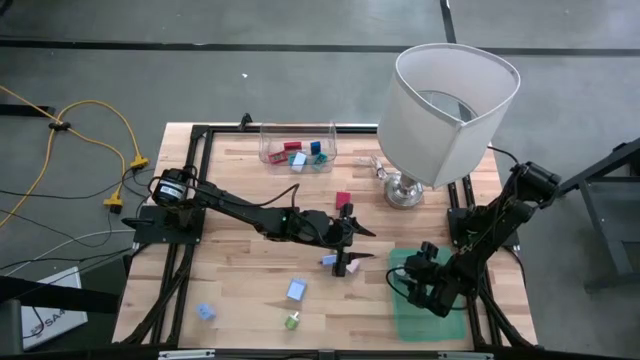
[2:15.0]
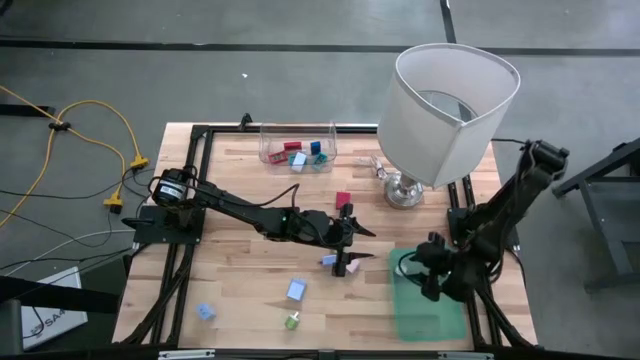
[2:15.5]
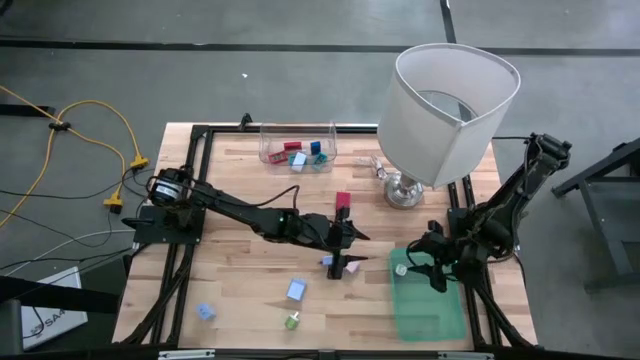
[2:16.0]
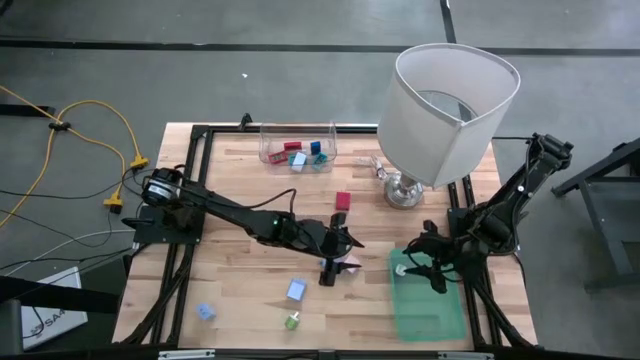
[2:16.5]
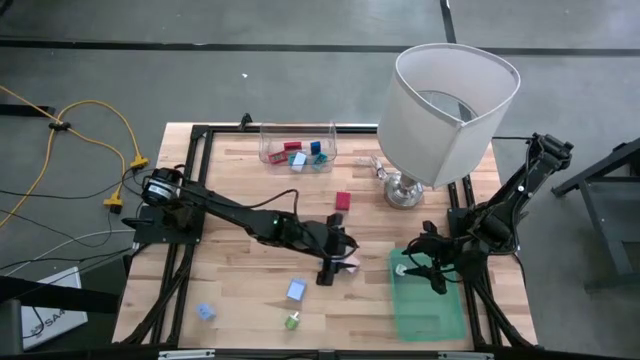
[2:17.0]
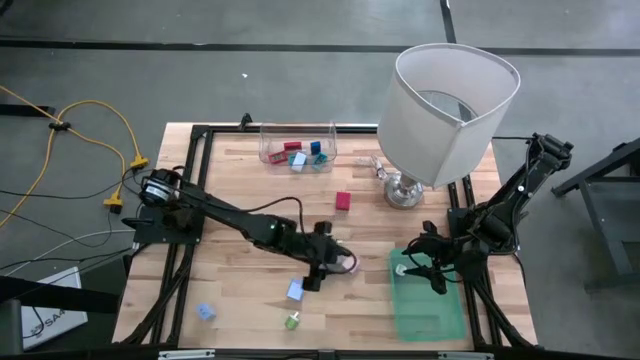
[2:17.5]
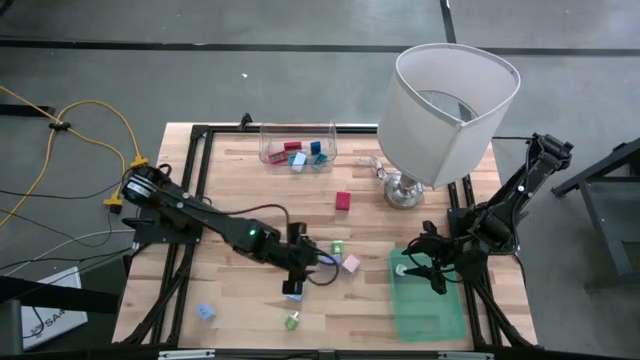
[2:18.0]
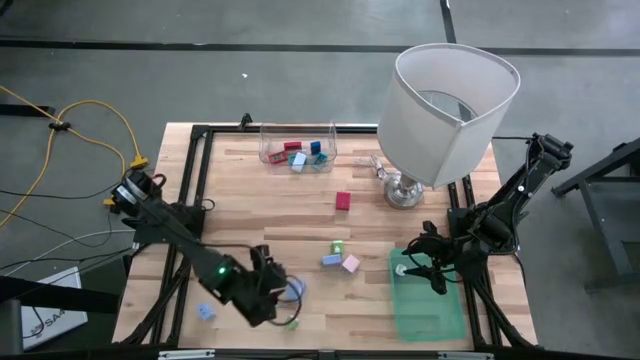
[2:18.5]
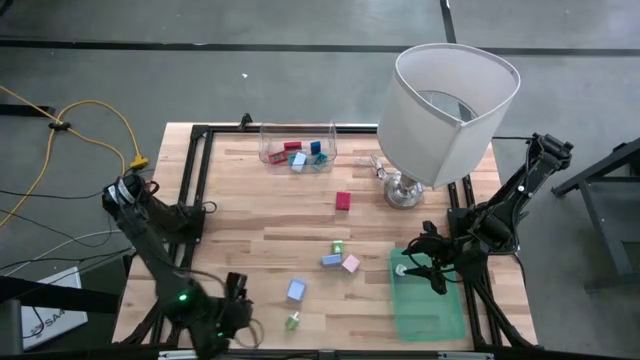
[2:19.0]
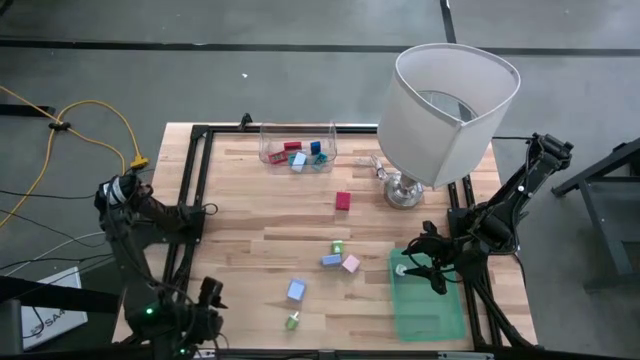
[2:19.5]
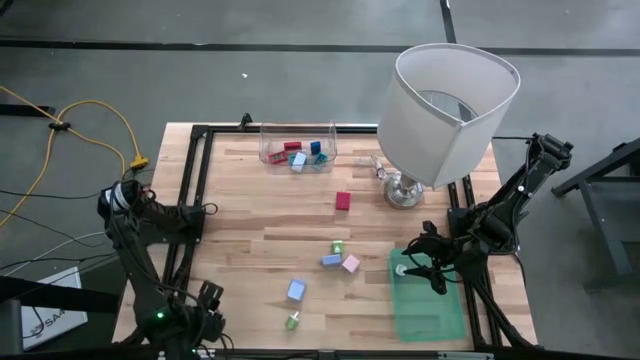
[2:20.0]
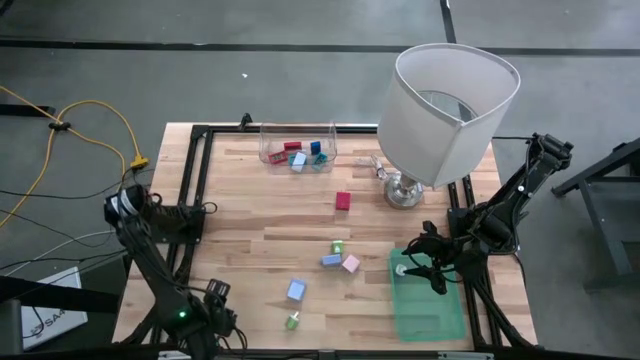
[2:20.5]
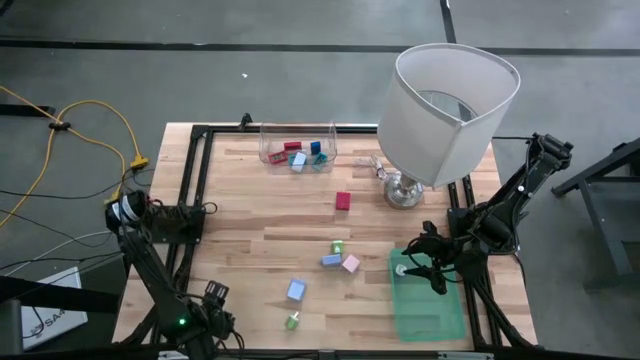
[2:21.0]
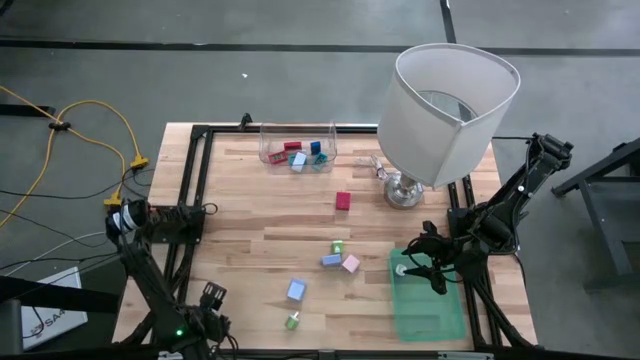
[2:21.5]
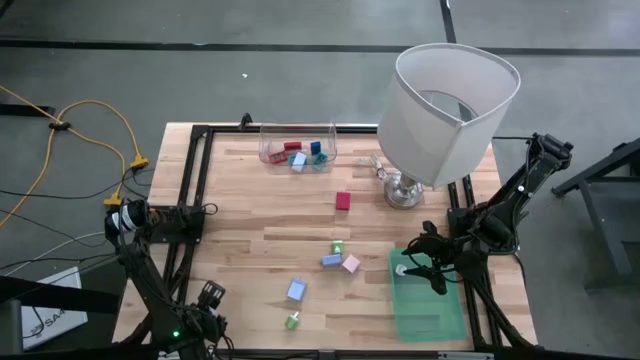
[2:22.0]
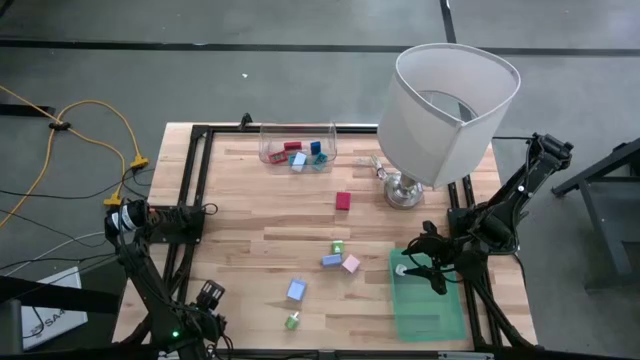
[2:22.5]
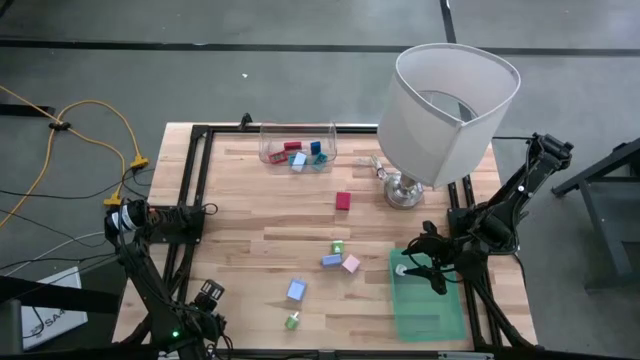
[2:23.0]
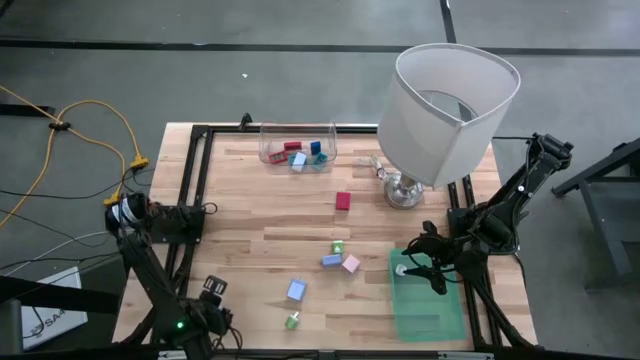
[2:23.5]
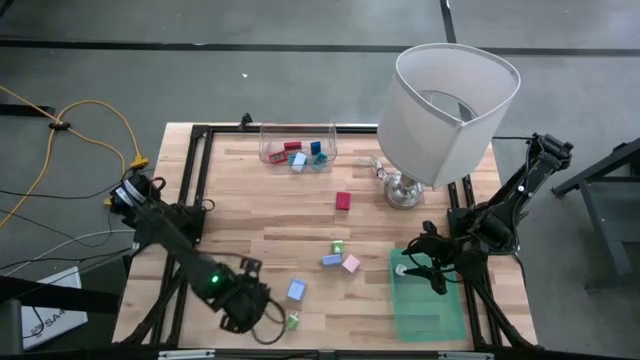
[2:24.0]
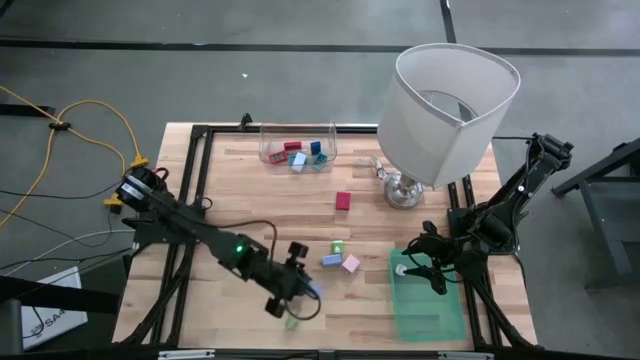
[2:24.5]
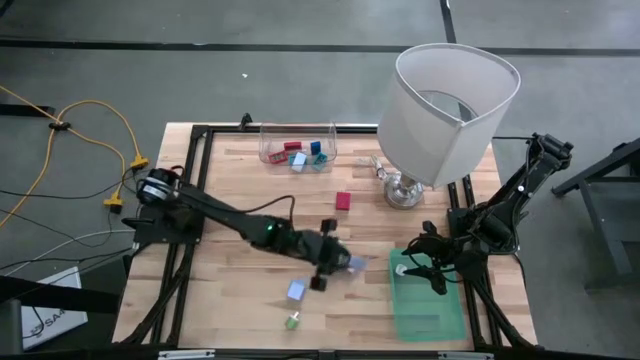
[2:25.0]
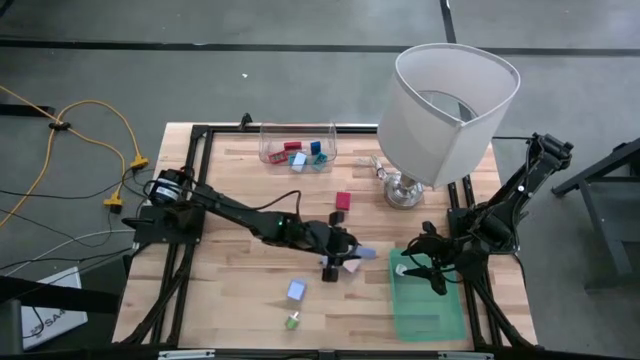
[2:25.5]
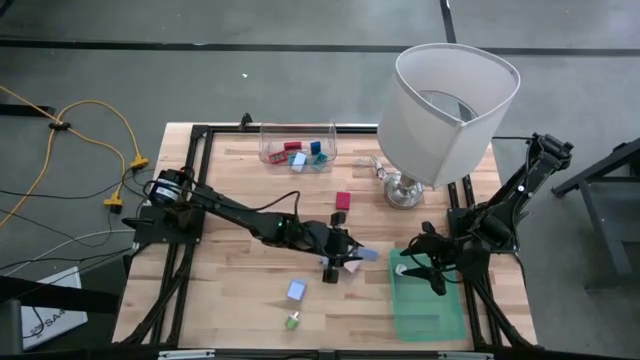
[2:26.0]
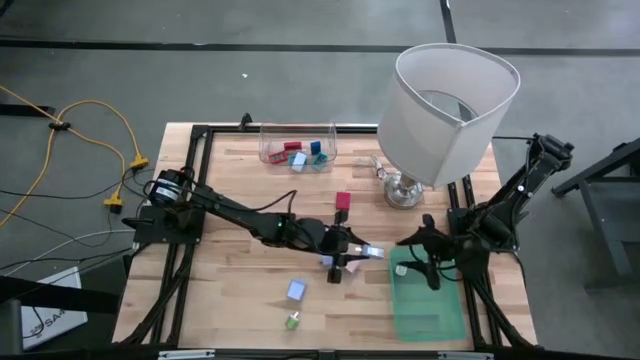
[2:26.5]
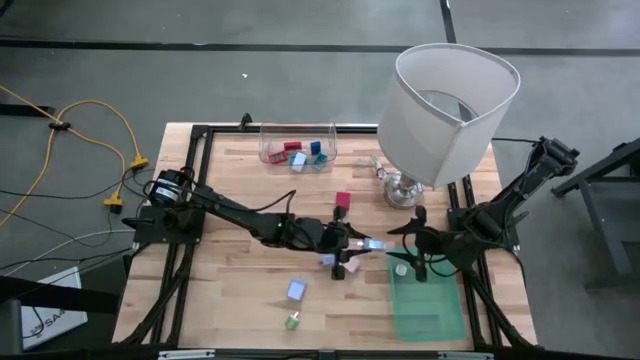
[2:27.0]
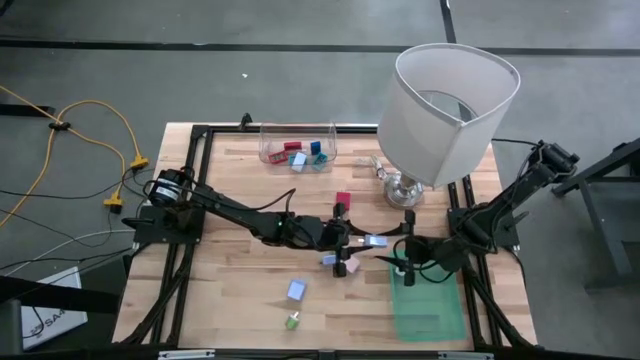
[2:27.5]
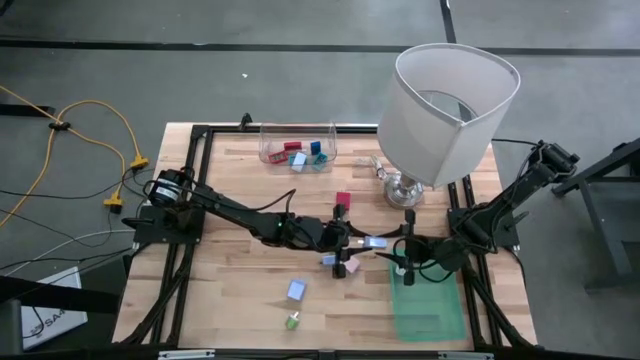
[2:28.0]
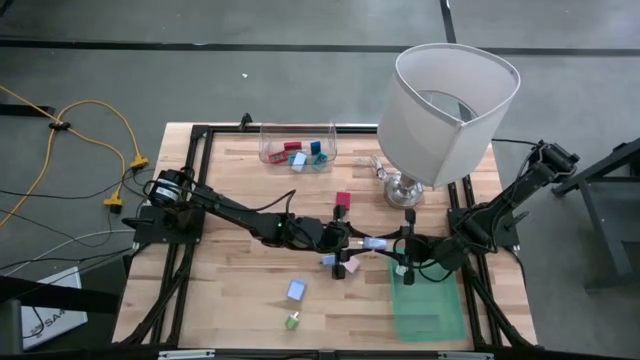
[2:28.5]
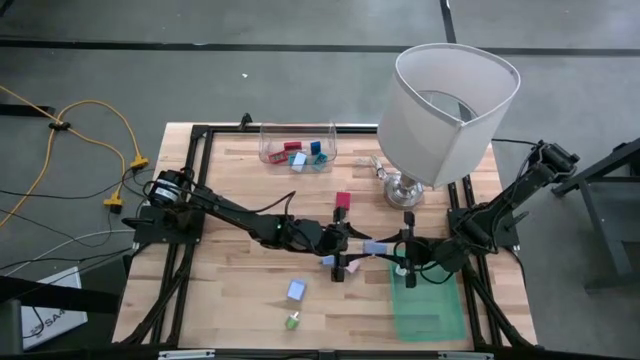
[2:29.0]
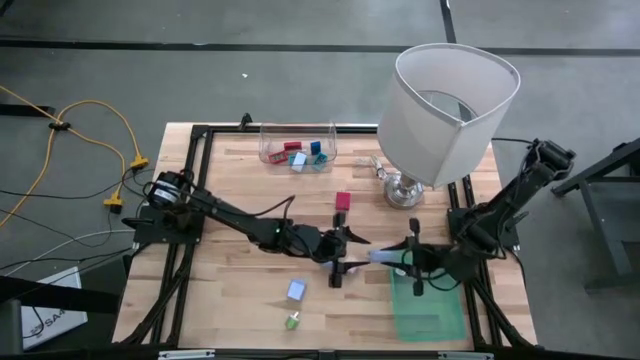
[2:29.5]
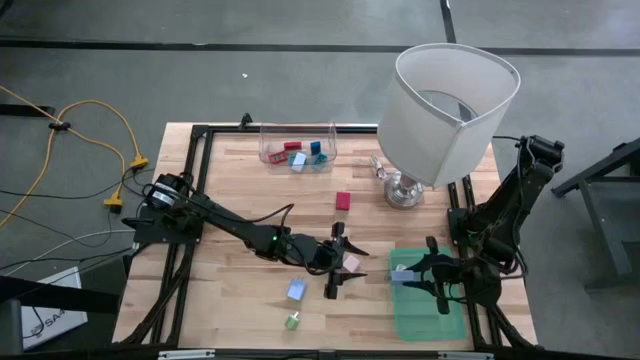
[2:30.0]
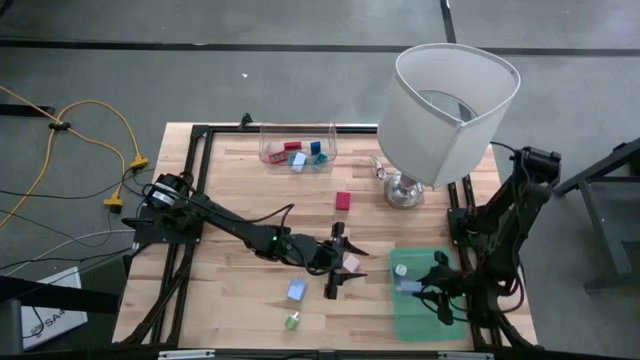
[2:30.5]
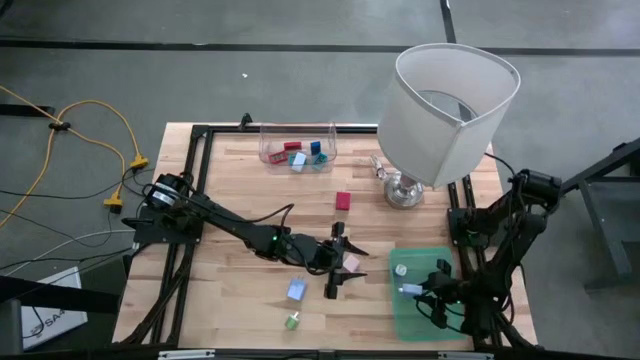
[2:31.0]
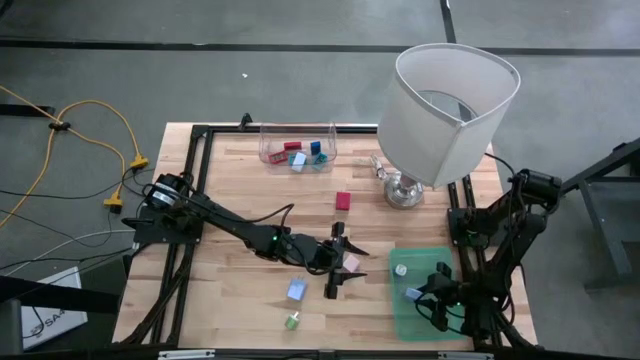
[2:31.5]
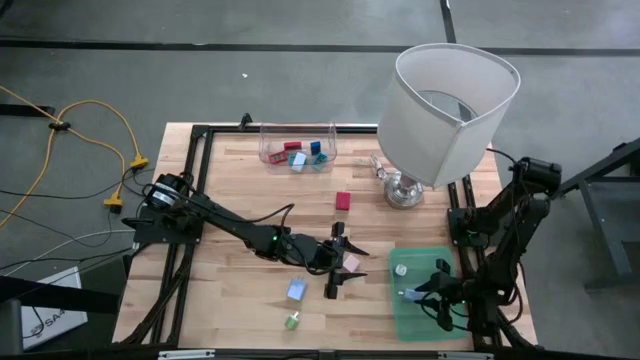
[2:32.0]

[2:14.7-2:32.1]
Task: Pick & Place Office items
Put the left light blue charger adapter into the green bin

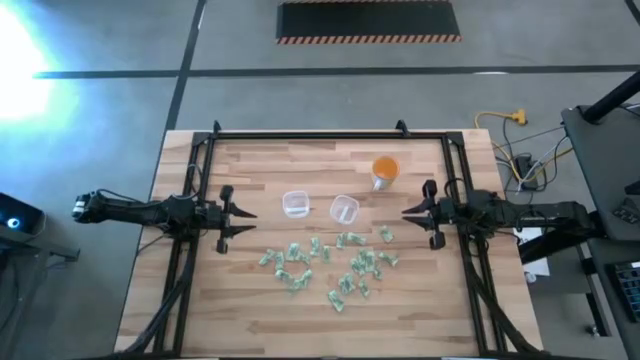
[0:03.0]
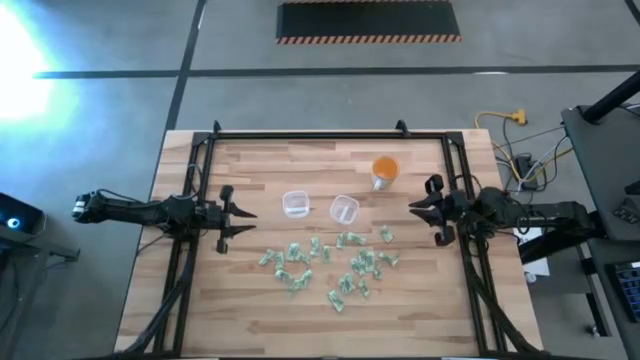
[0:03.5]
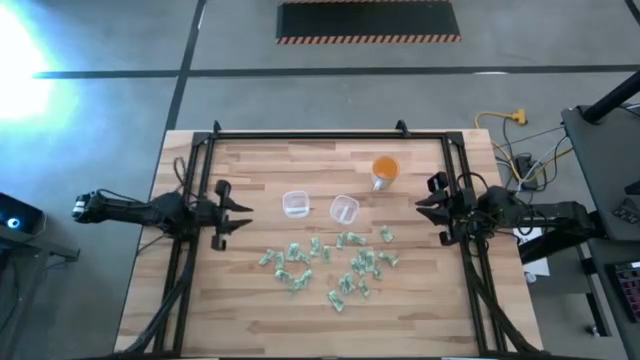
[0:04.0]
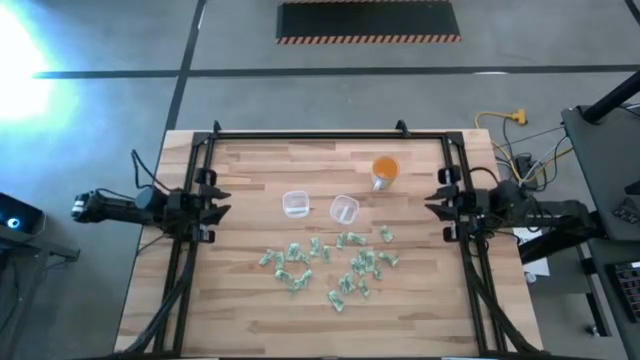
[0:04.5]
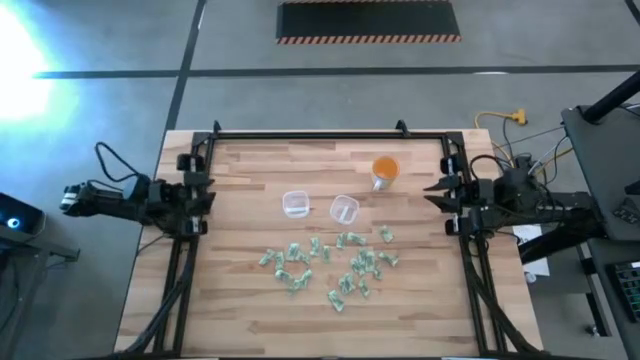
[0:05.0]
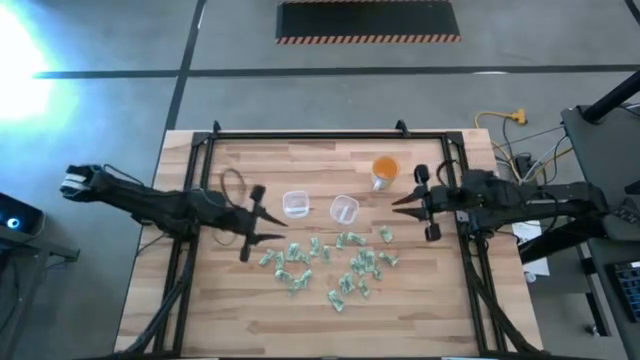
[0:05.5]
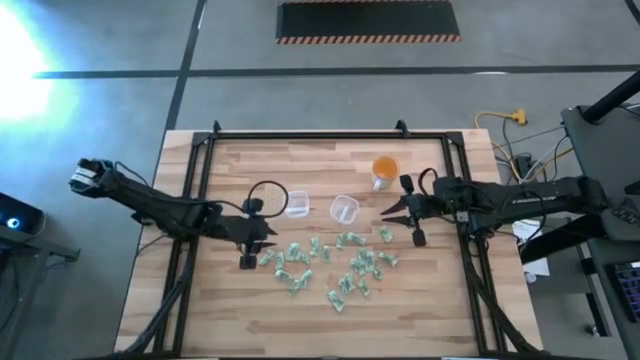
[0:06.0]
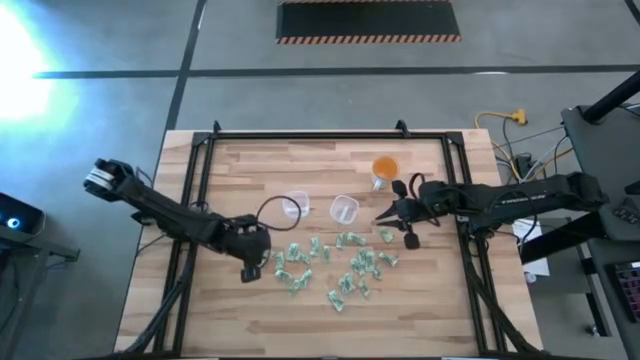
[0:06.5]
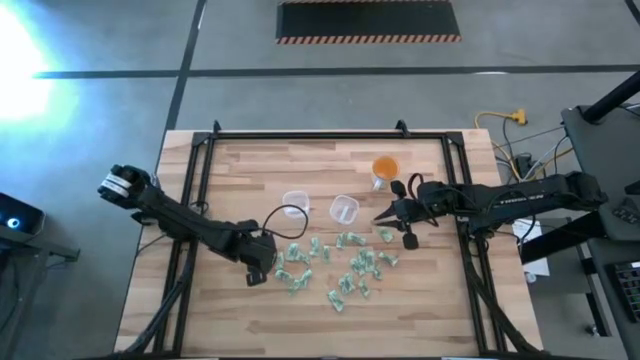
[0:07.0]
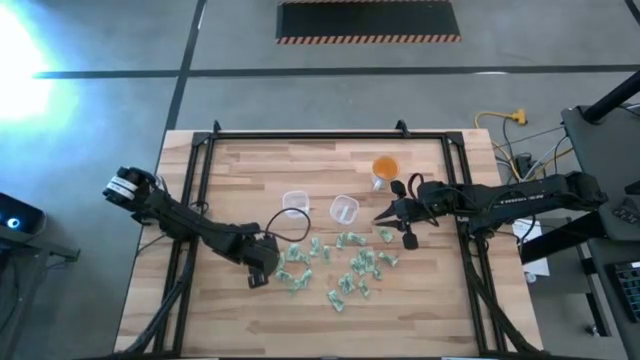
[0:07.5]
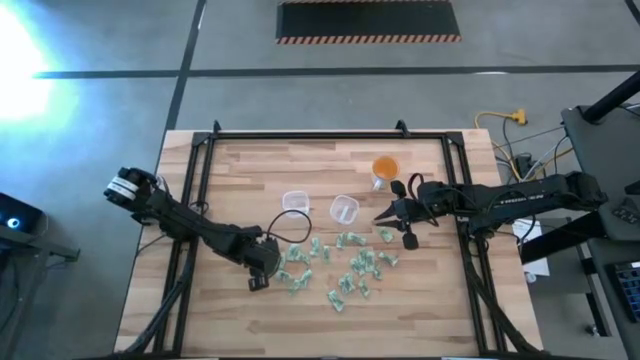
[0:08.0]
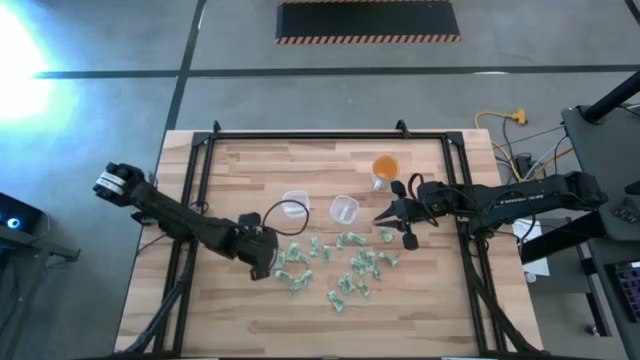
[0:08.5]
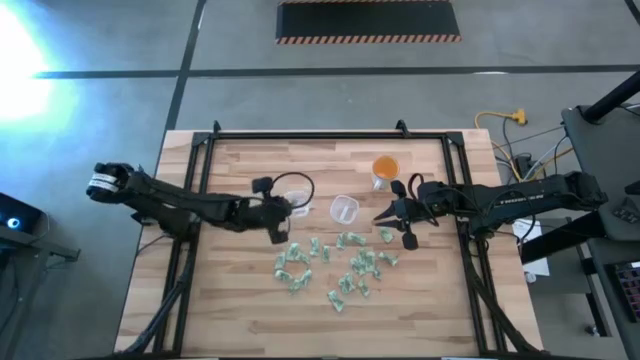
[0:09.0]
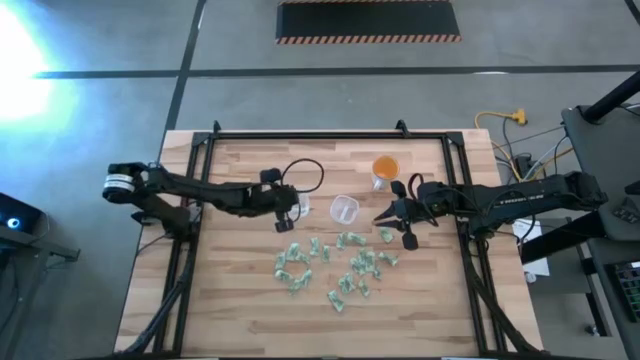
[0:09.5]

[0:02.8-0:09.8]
Task: Pick and place items into bin
Put the white stevia packet into the left transparent bin
